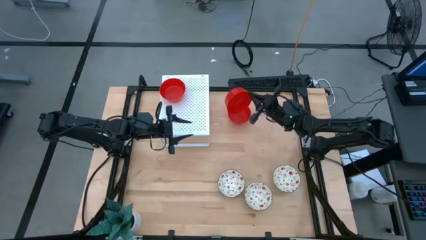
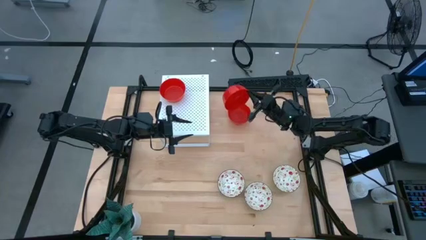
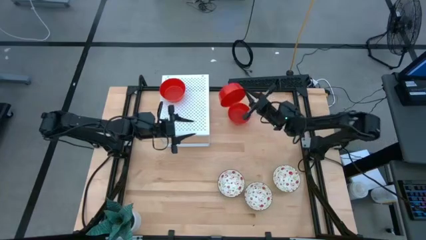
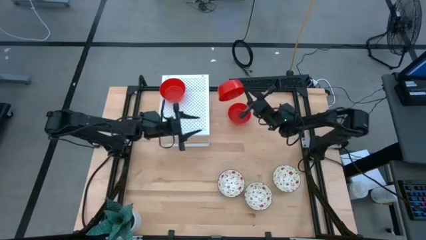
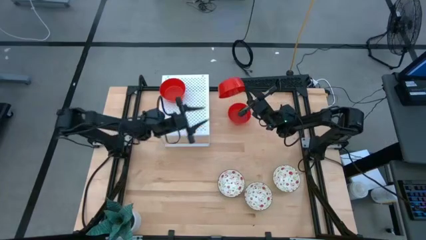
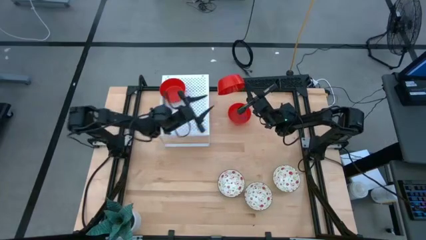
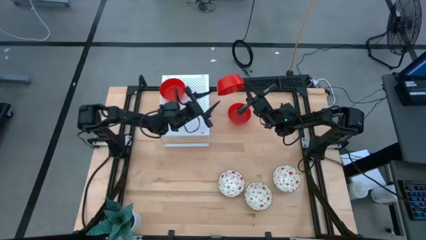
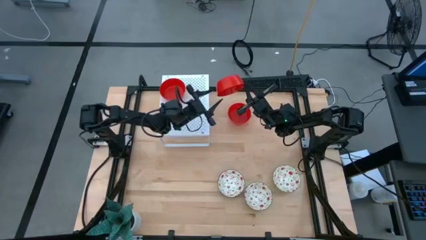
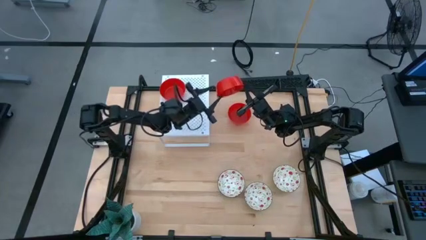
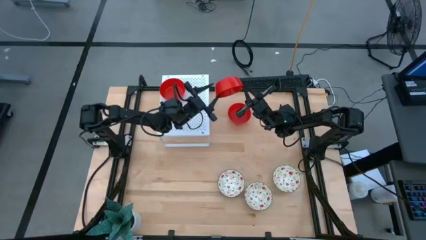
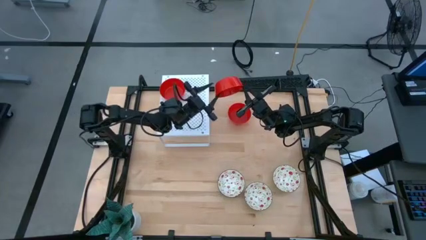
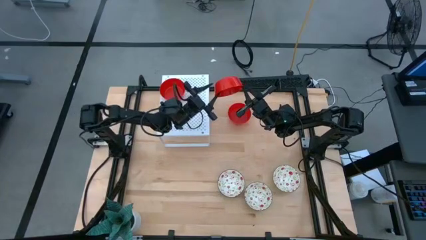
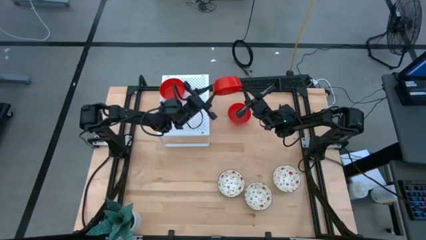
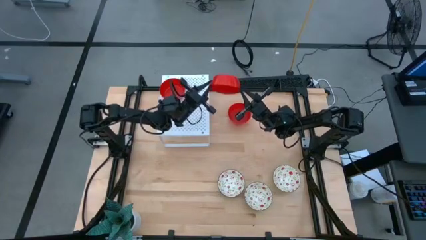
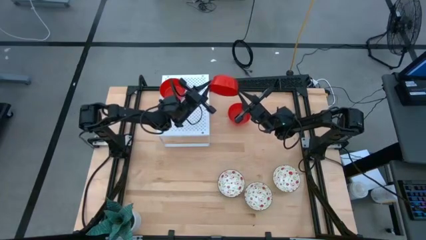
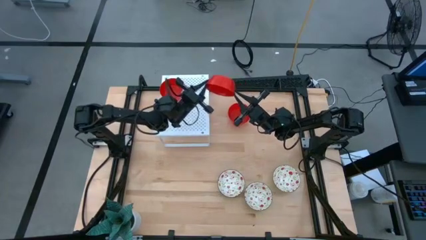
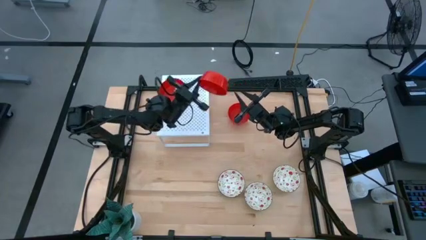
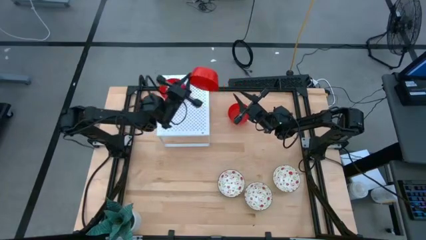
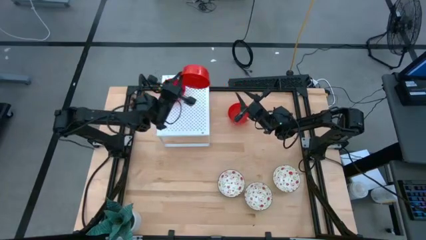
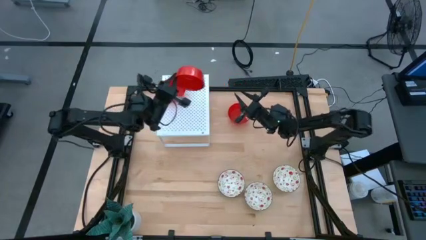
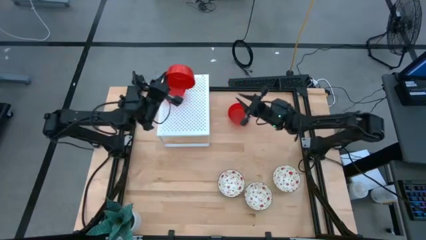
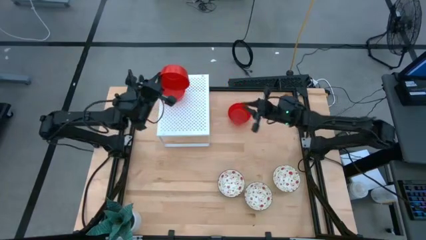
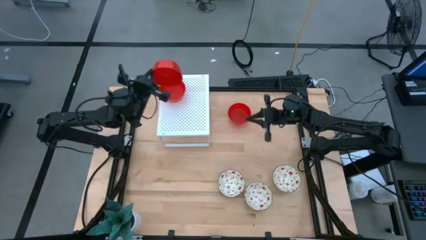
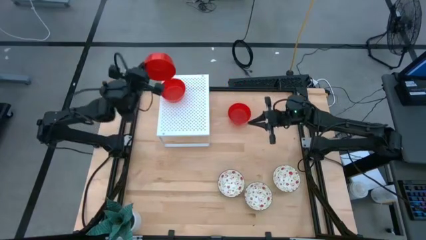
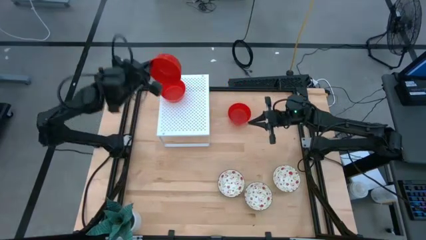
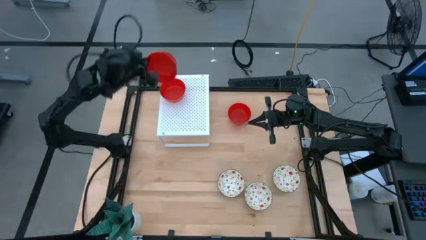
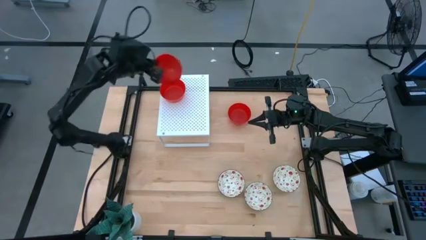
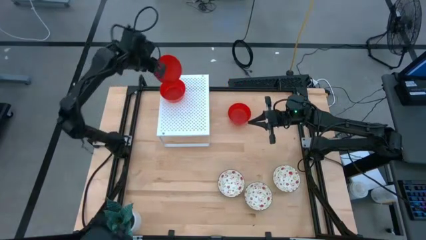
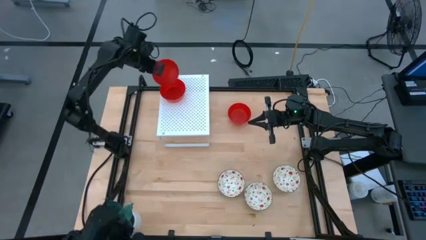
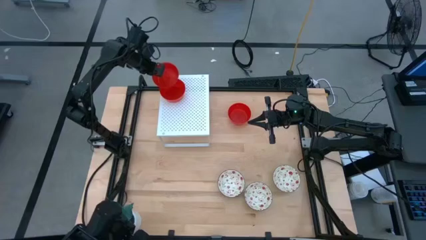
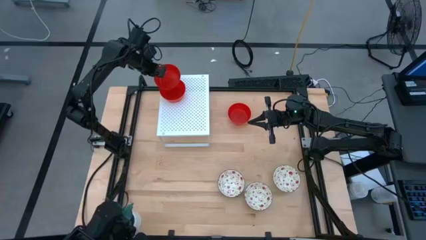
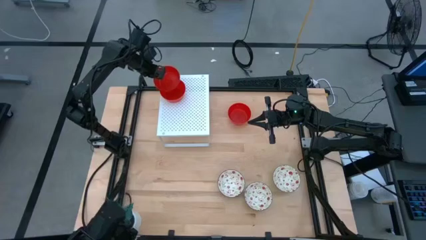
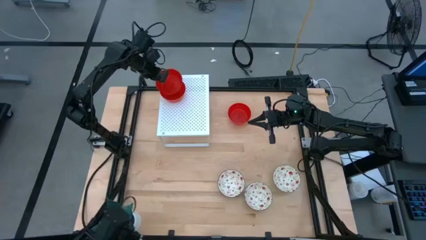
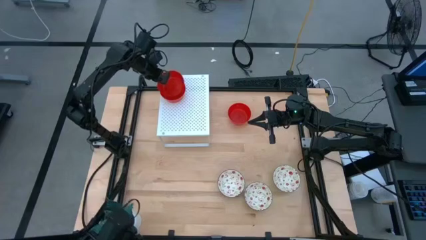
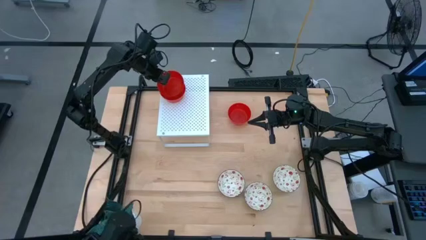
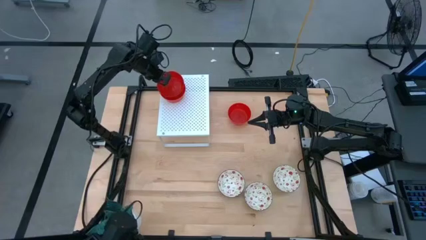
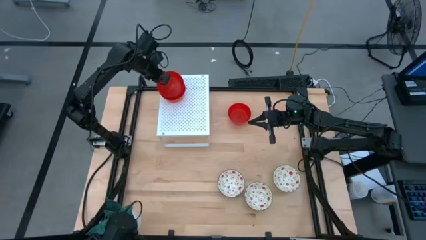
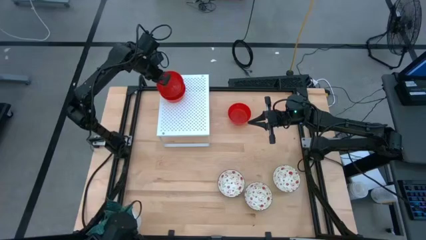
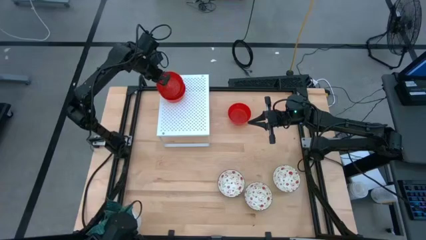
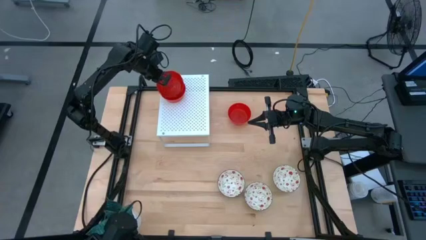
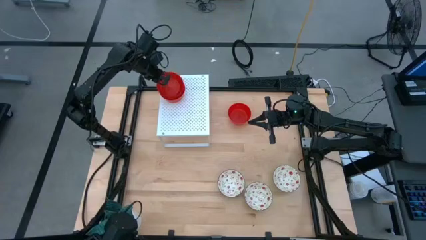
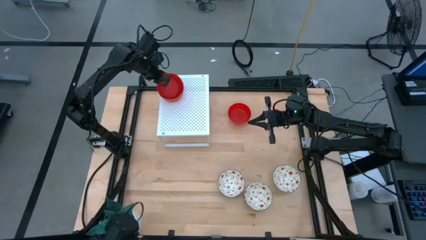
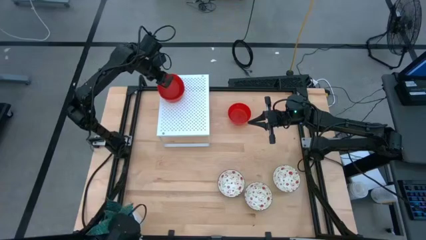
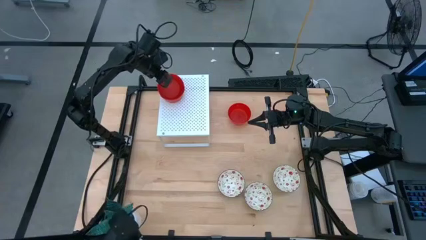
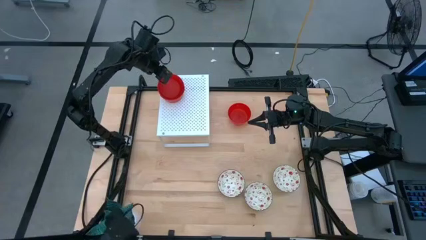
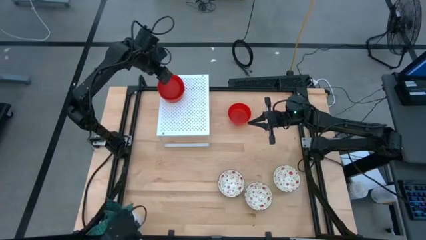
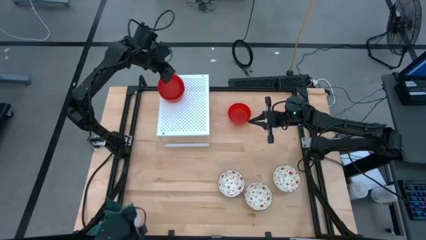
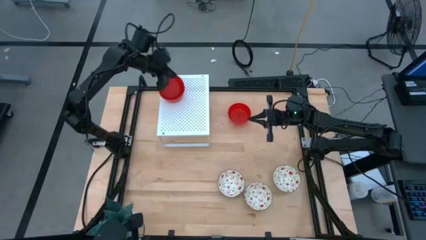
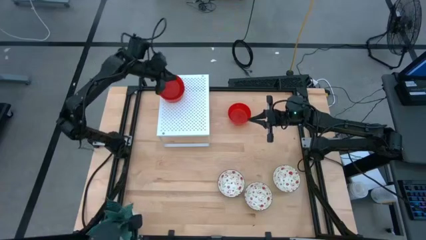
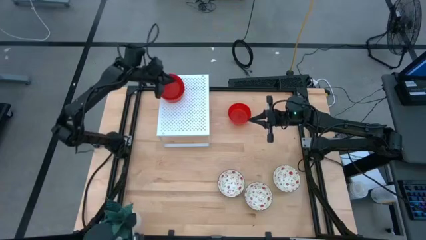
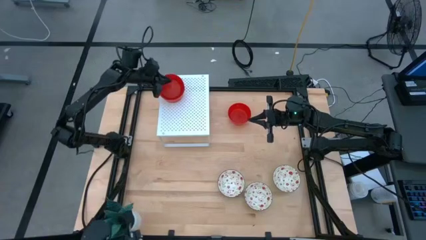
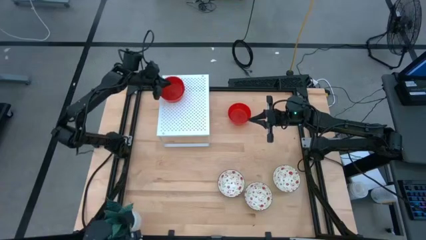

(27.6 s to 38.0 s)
Task: Pick & Place Mini bowls
Stack the bottom red bowl on top of the red bowl on the shelf
